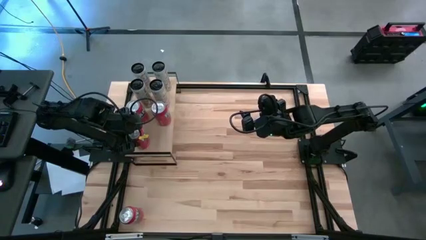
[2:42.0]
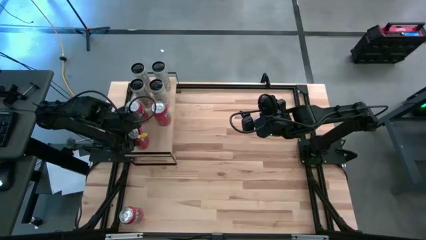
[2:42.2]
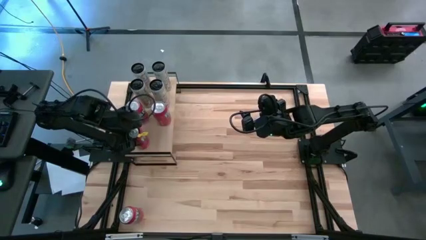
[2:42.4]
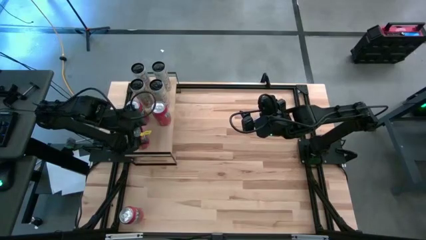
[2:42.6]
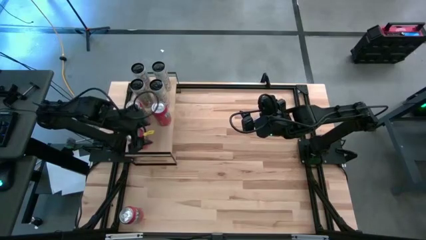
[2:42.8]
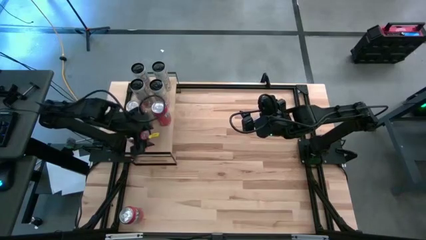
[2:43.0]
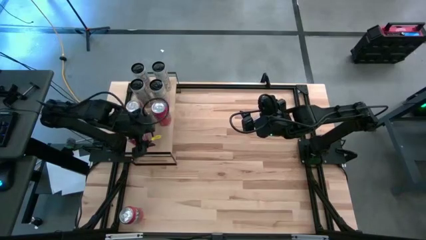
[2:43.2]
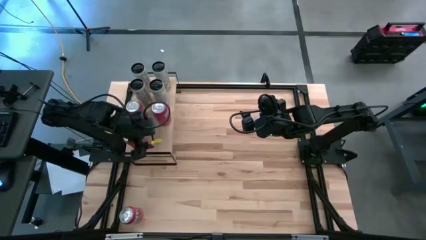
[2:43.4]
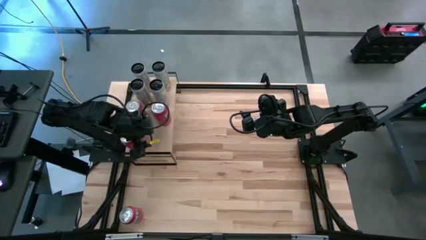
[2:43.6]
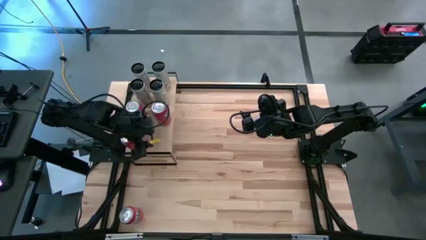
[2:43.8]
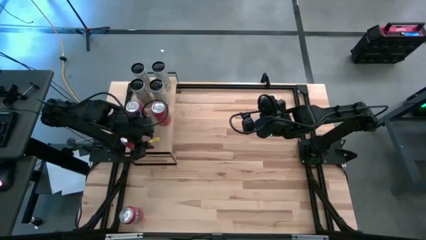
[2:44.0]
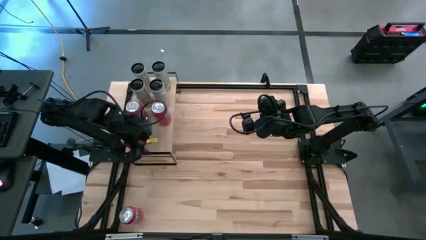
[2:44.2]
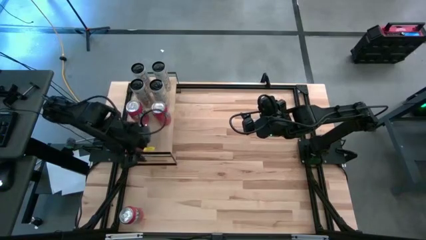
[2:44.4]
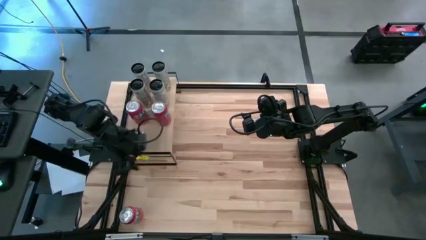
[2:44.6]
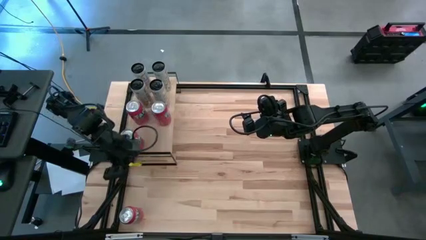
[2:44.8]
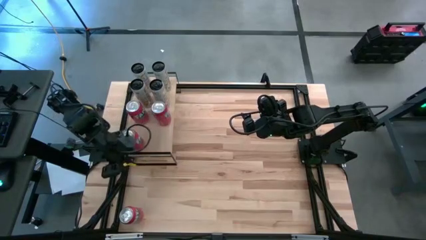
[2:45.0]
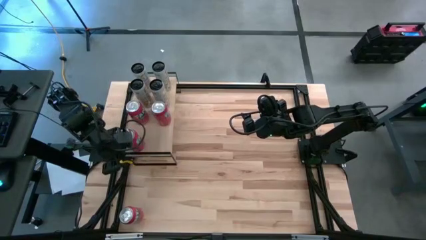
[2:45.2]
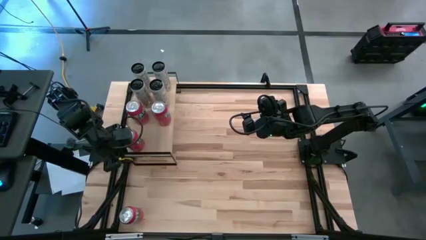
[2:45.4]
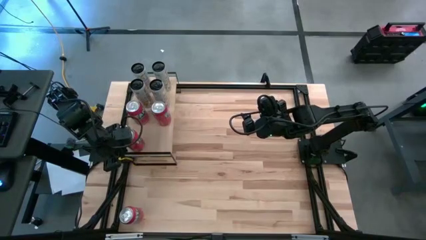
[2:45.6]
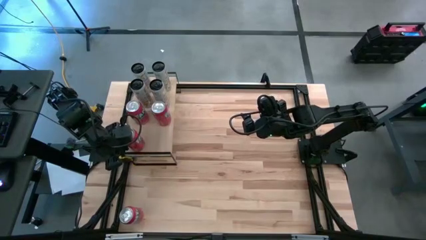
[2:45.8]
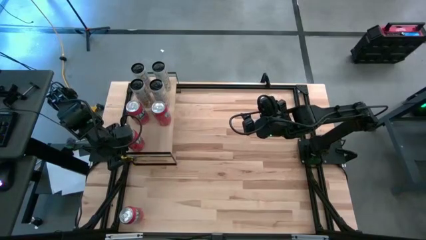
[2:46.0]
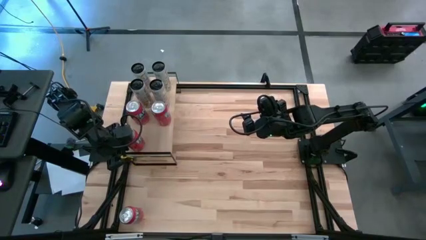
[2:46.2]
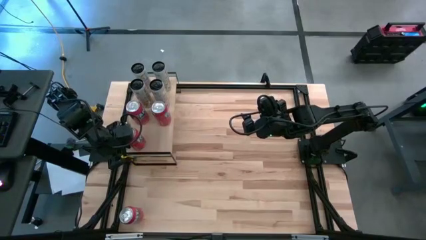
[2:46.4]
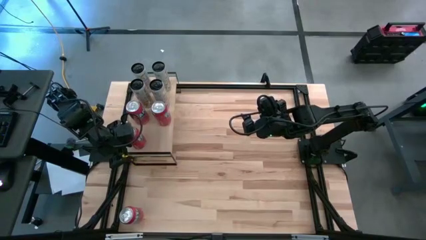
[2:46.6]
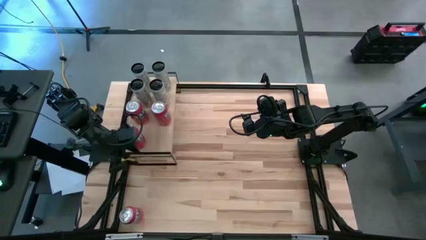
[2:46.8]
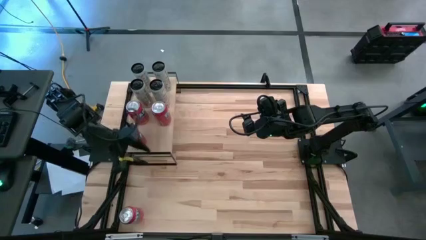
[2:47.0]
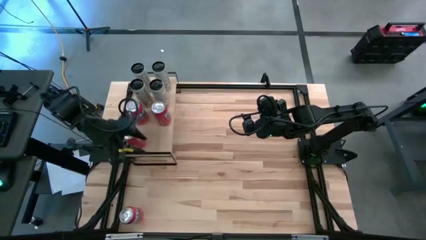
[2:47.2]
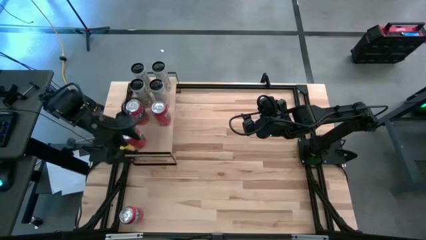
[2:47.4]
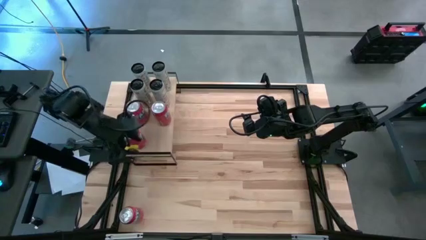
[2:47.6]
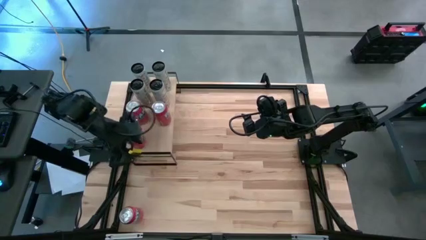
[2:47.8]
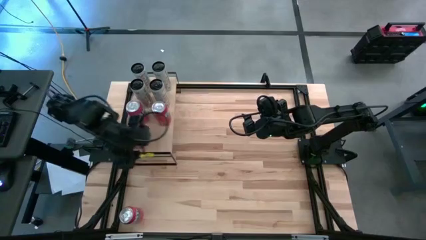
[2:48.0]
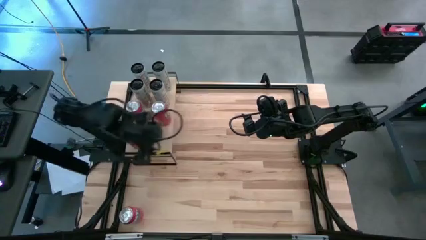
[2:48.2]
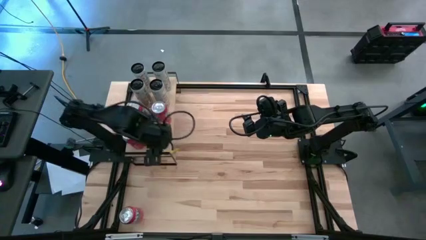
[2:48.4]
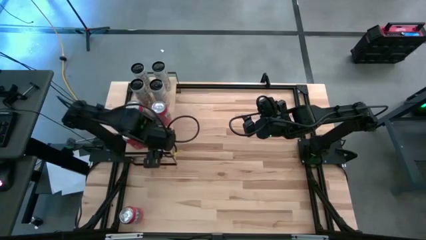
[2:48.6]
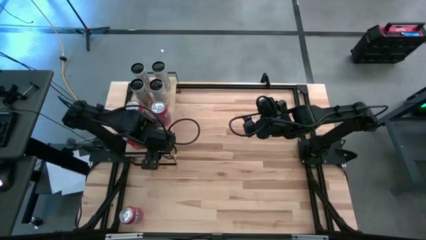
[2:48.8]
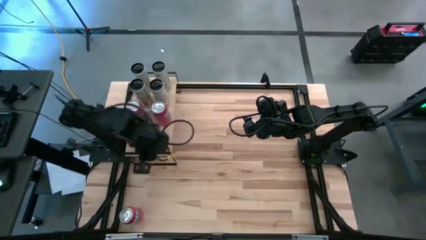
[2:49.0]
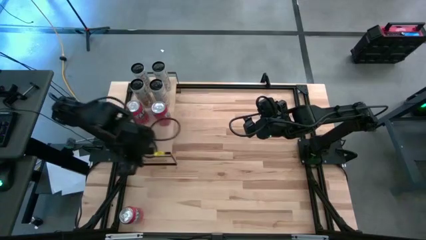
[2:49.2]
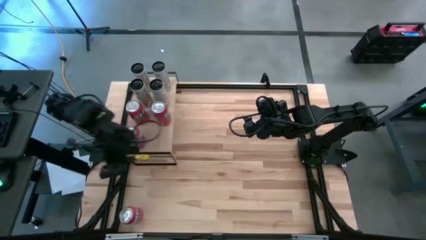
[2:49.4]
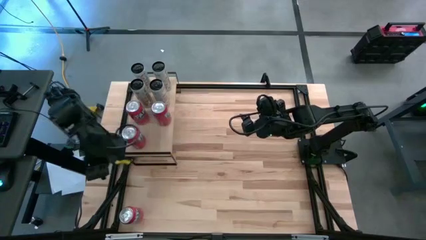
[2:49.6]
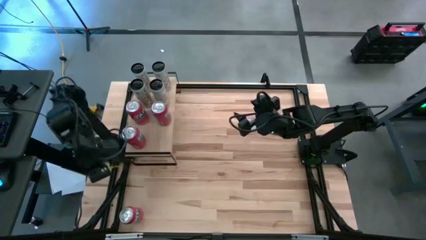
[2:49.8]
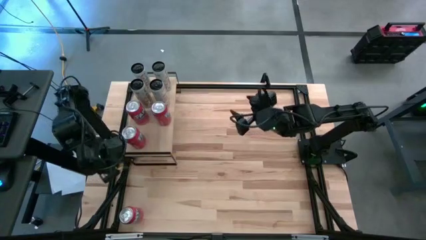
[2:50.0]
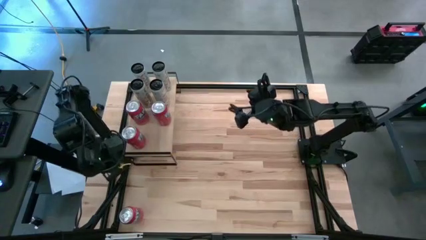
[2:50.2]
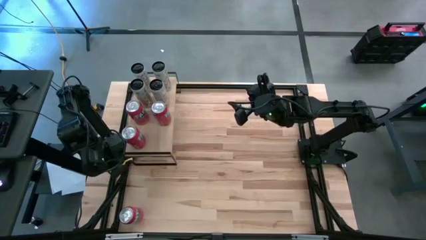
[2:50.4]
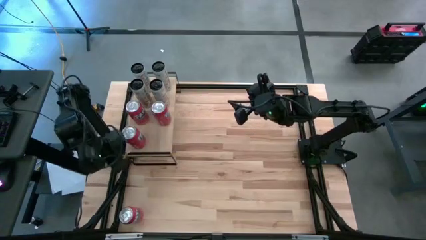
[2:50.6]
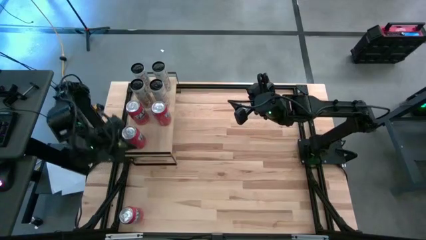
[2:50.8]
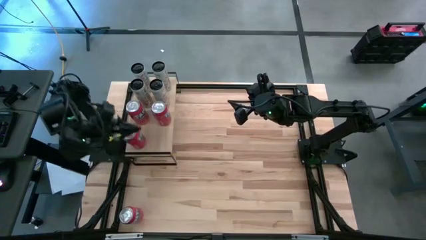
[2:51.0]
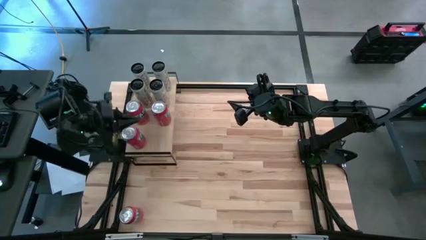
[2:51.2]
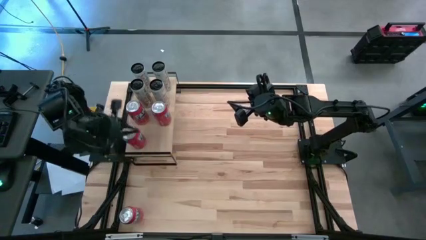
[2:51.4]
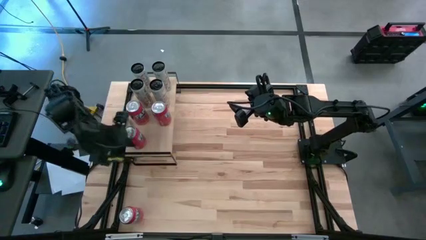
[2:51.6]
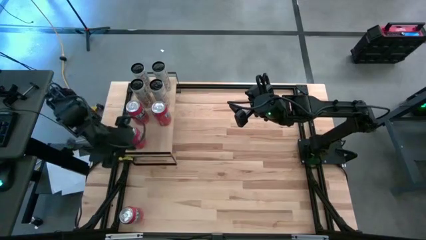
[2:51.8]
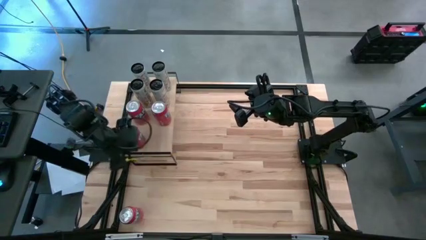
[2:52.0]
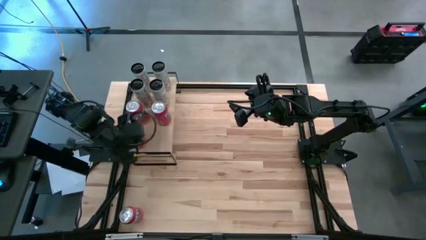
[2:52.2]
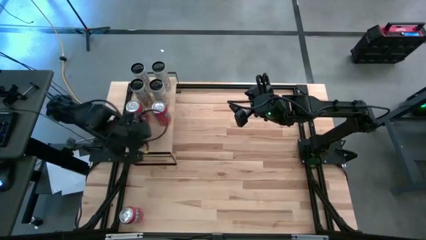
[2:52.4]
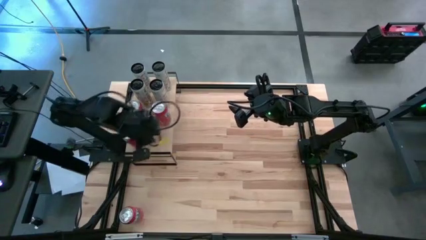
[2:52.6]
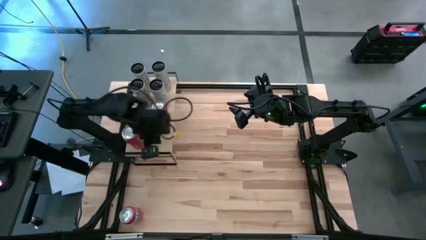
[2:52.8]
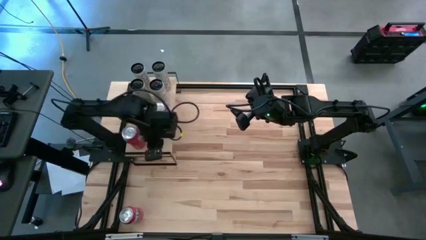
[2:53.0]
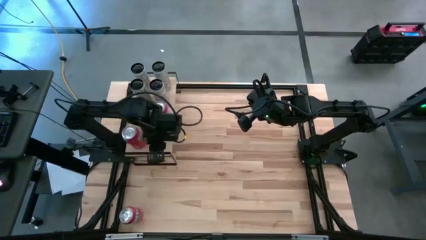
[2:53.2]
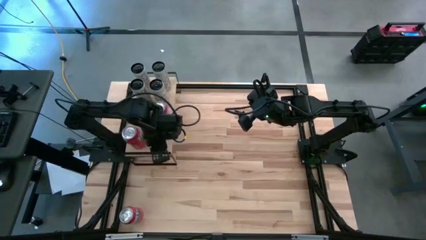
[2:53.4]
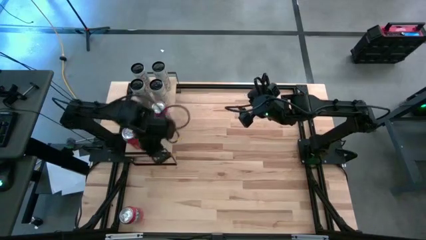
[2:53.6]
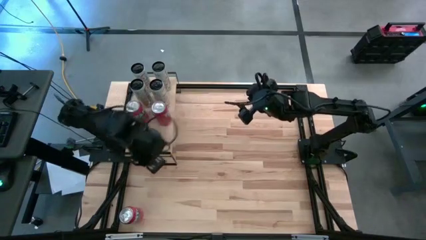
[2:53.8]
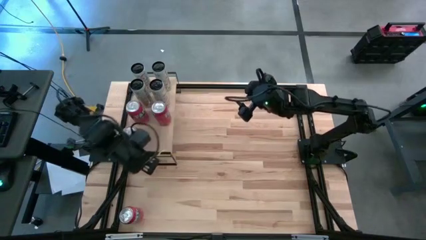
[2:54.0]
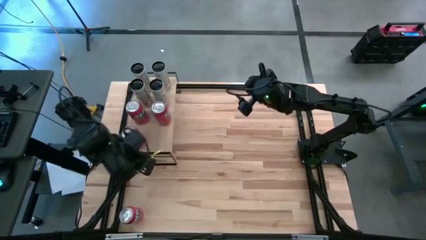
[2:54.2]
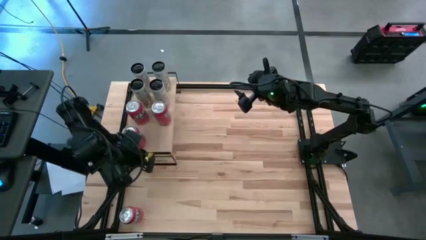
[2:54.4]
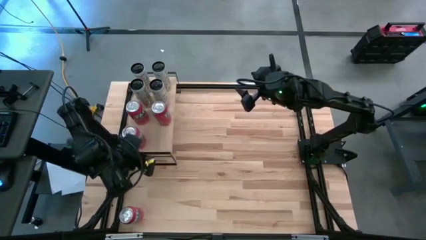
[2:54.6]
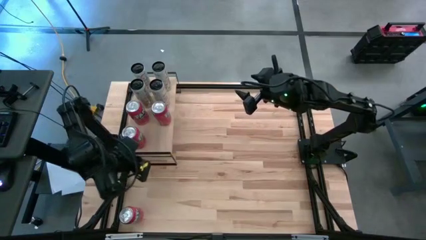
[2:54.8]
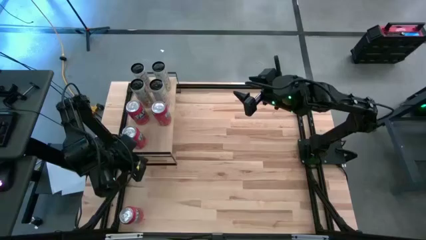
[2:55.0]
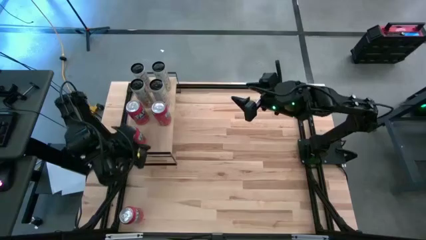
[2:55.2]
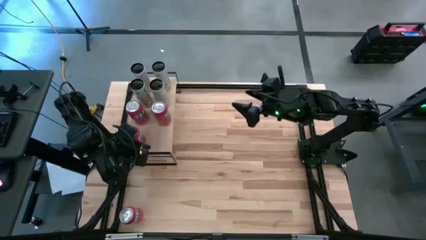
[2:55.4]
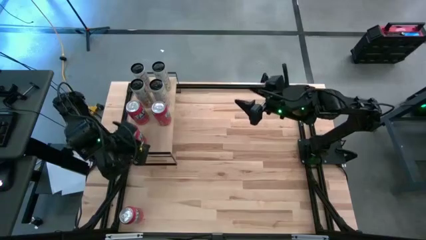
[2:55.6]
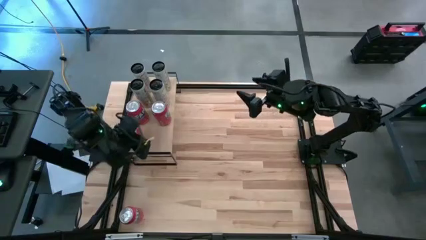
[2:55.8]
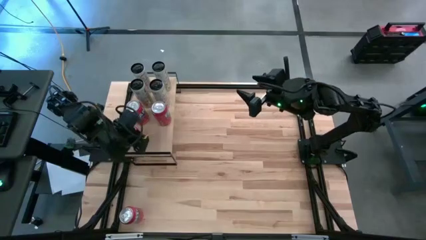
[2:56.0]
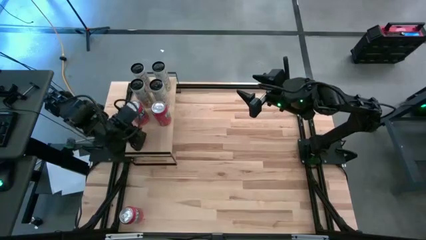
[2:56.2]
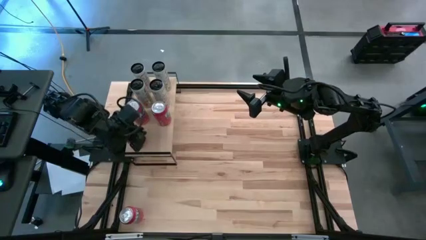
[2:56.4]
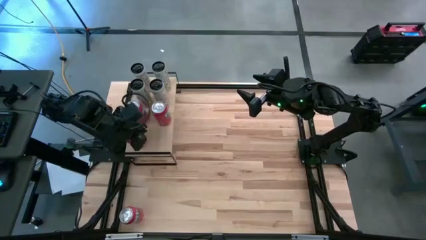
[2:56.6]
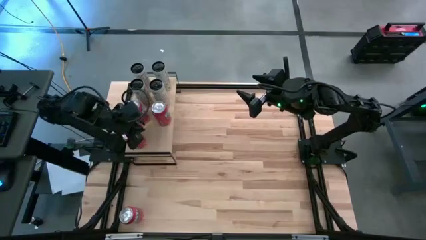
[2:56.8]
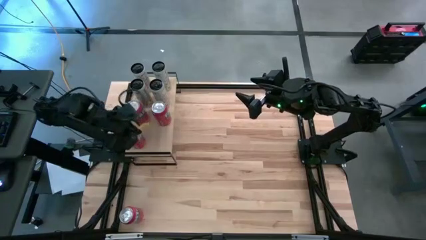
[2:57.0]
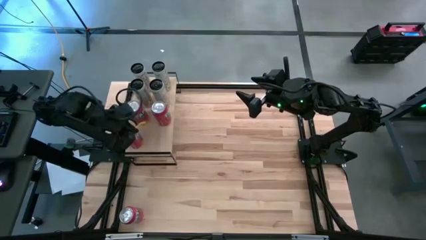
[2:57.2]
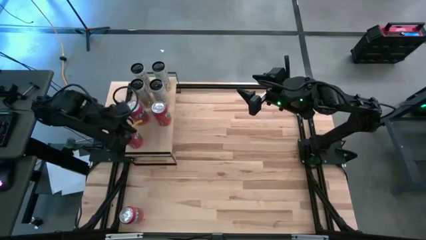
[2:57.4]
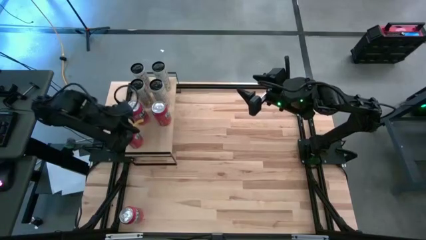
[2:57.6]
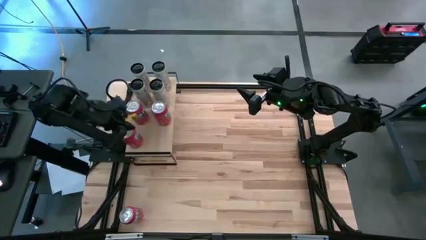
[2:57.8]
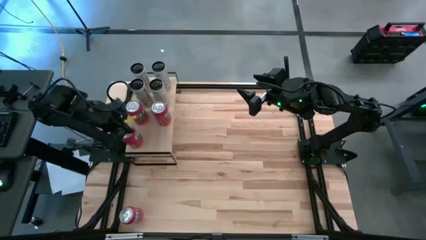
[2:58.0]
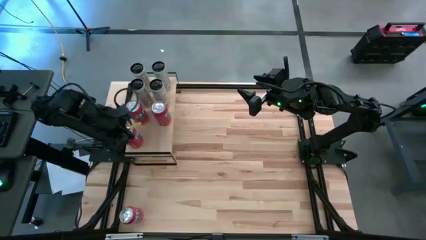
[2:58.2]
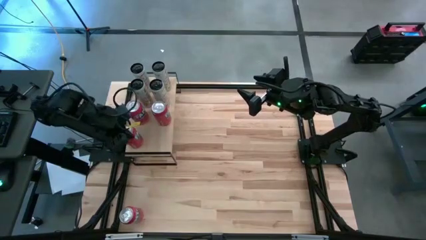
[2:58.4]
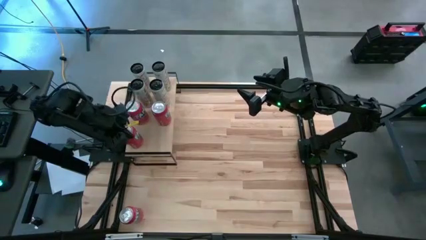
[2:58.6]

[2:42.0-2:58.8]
Task: Place canned beverage on shelf
Put the top red soda can on the shelf
